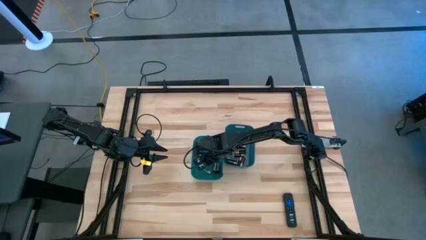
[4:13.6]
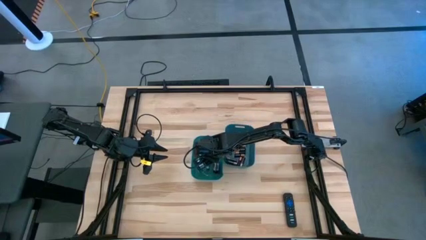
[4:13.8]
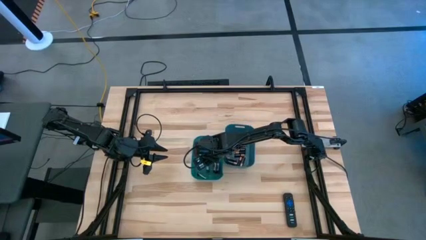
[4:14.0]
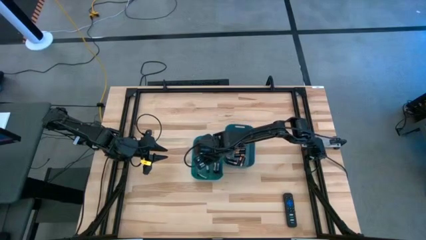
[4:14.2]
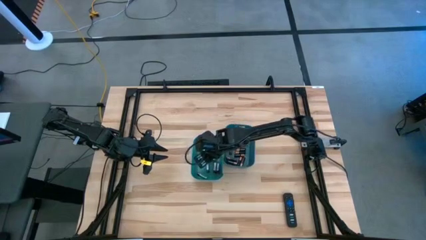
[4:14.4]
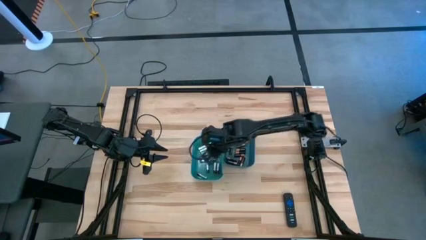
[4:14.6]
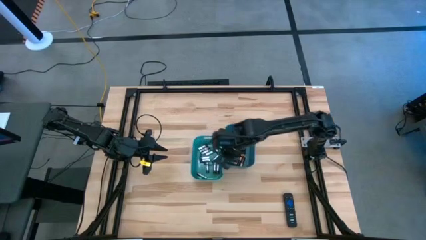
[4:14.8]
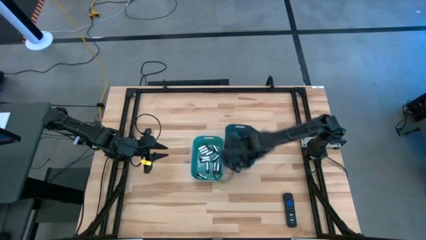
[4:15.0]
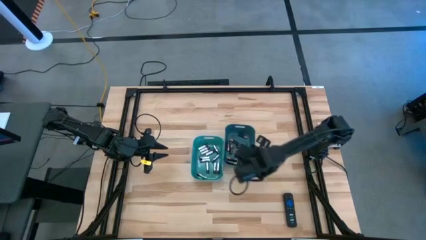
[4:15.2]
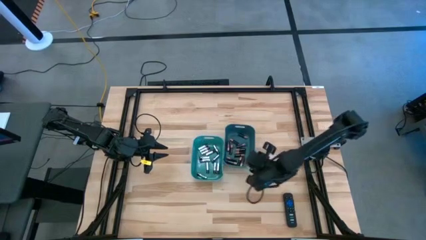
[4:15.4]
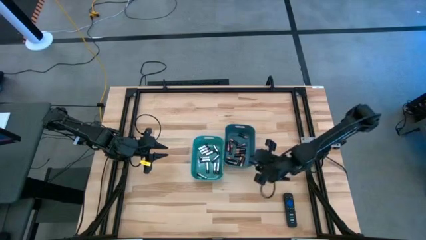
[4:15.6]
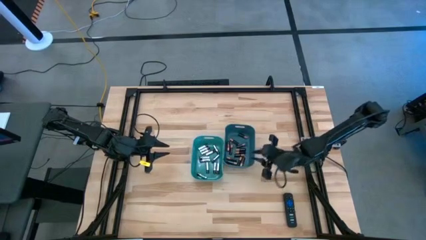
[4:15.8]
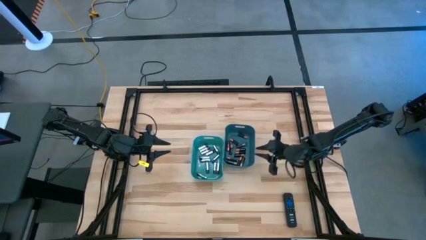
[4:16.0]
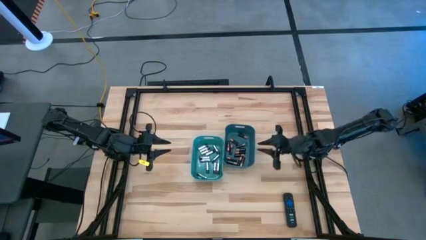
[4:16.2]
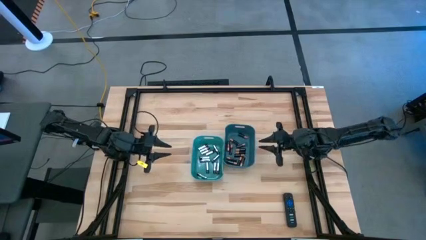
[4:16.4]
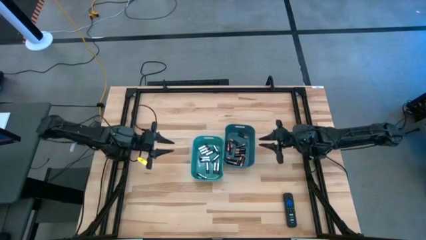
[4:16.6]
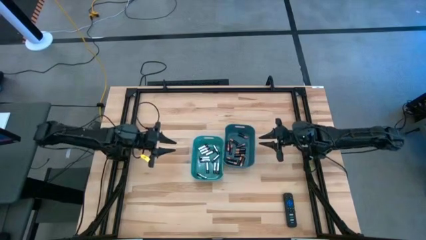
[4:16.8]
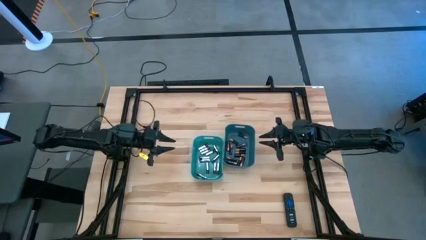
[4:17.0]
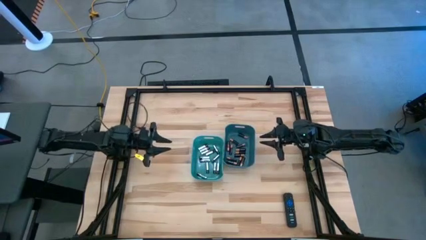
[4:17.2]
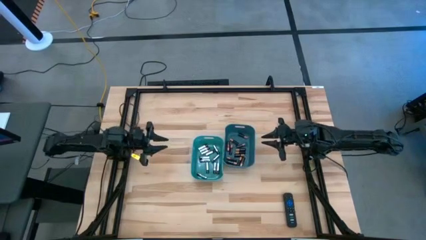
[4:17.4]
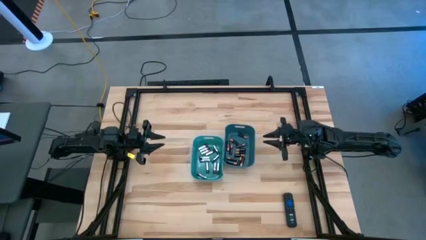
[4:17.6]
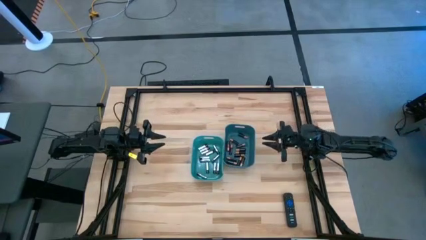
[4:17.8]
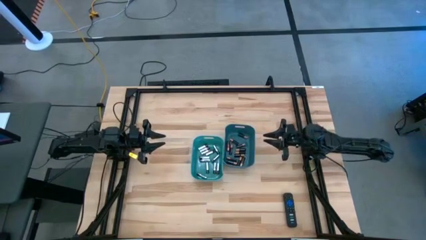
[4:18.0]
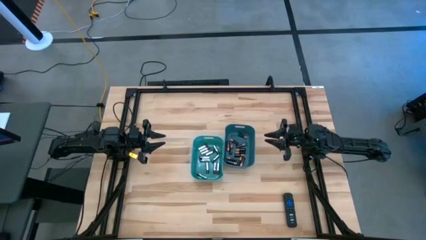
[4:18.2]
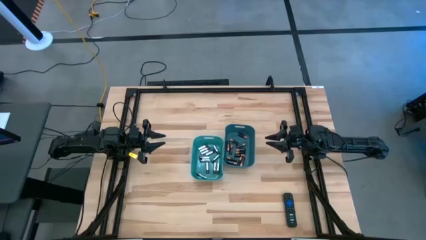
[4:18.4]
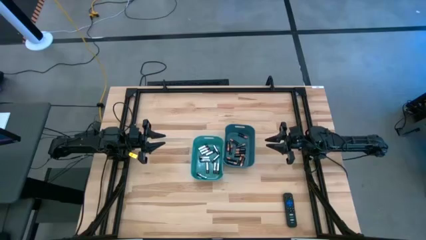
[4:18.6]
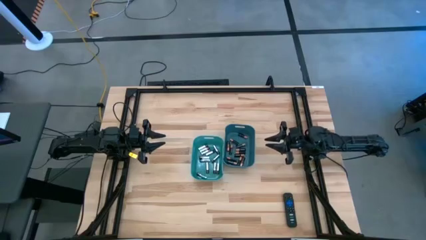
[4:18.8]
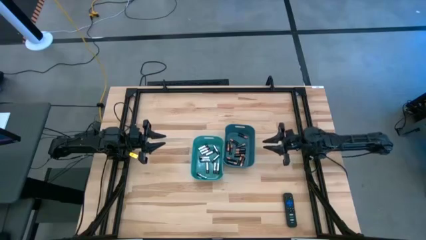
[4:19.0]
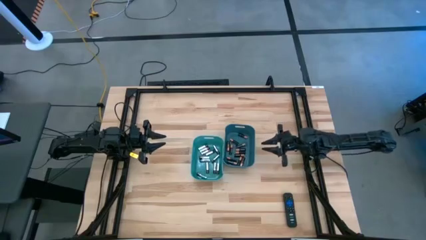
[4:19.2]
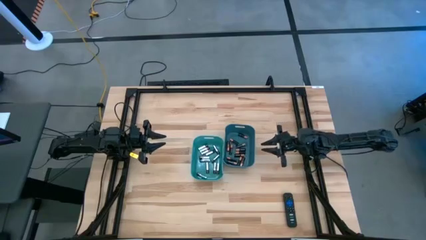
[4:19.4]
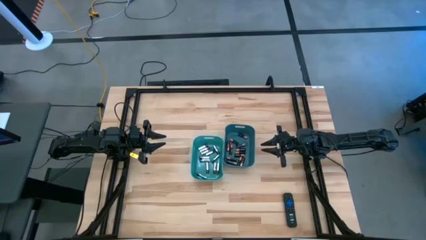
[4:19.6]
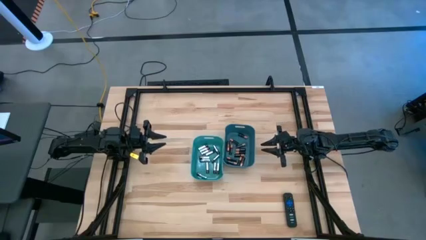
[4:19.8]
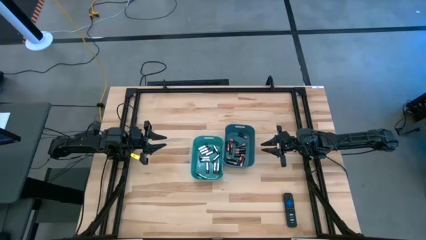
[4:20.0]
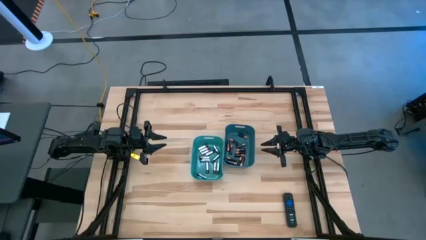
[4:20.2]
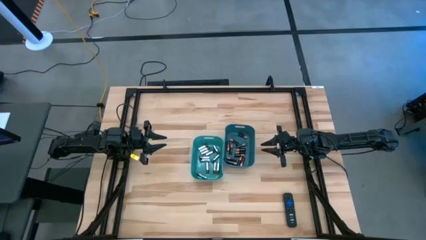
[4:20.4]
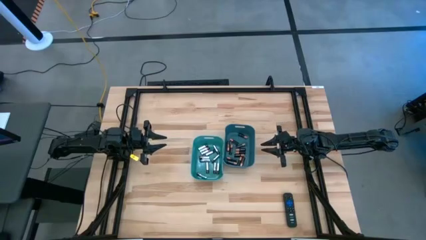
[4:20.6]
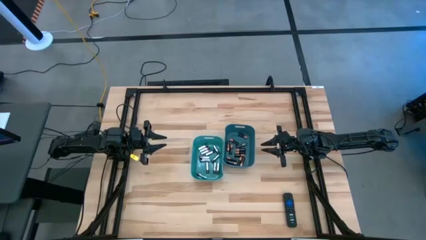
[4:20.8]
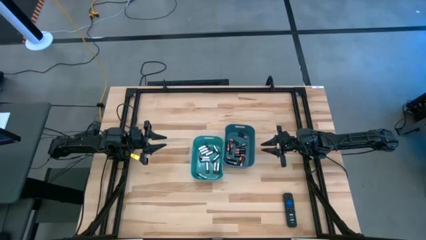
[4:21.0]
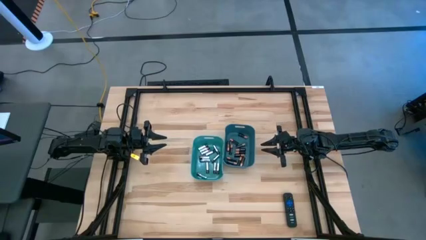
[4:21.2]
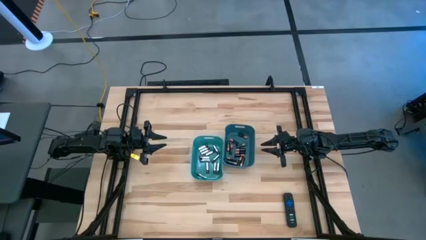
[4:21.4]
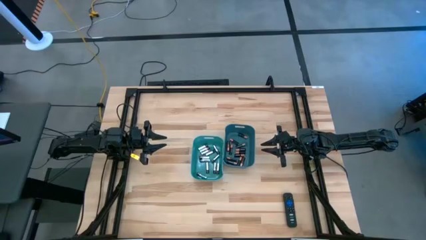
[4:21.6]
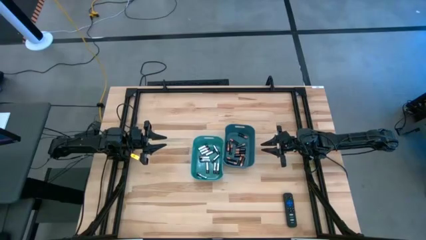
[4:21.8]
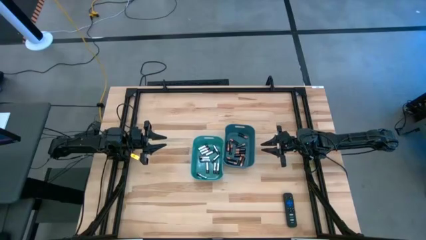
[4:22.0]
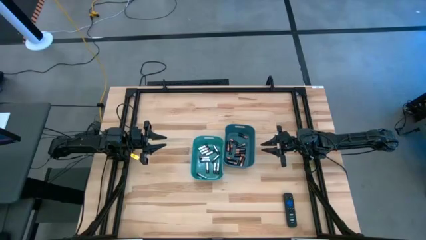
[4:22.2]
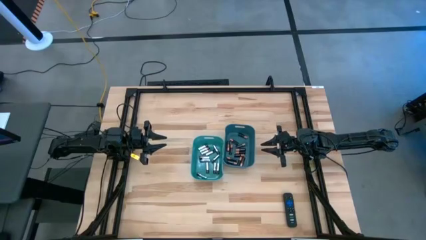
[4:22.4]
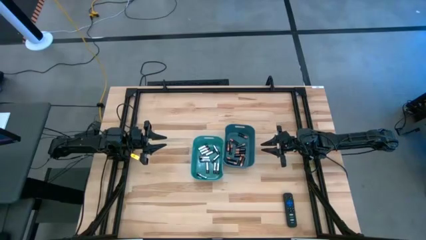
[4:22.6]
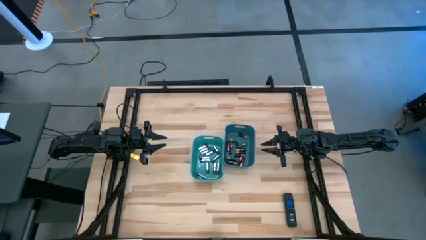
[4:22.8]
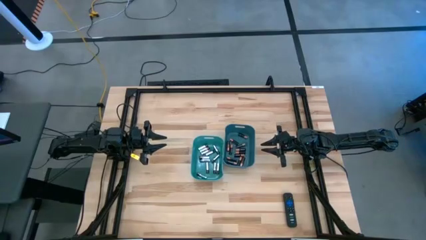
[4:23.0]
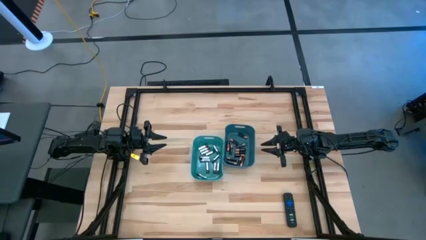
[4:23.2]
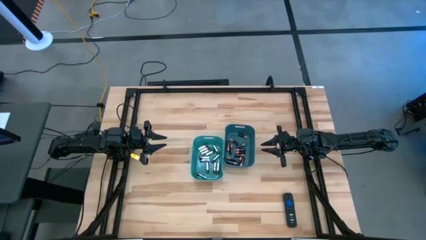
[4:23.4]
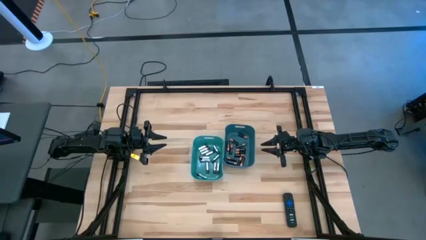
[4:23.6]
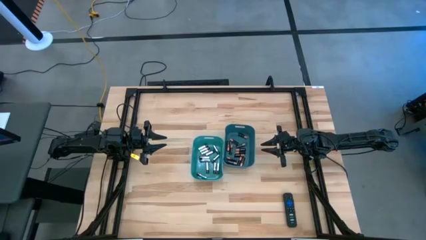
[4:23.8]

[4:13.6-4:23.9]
Task: Sort batteries
Return to Home Position
